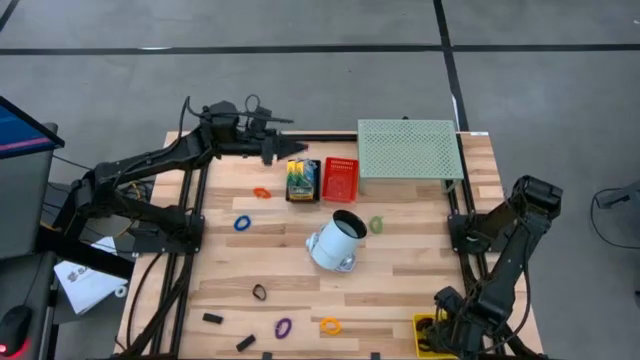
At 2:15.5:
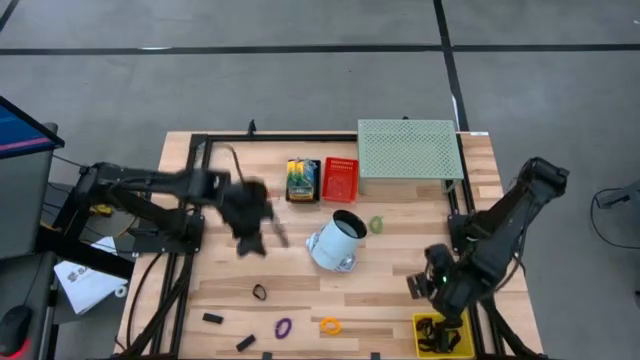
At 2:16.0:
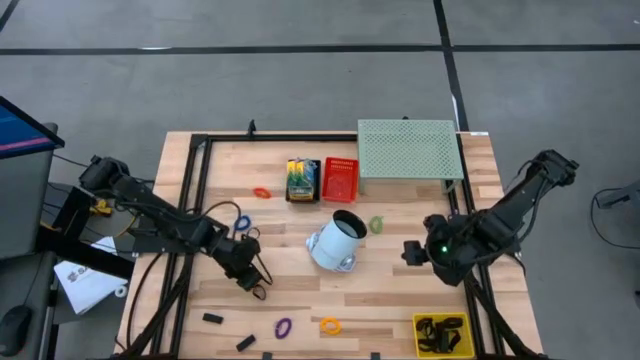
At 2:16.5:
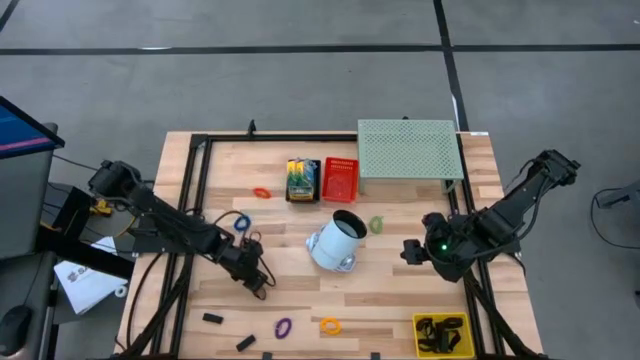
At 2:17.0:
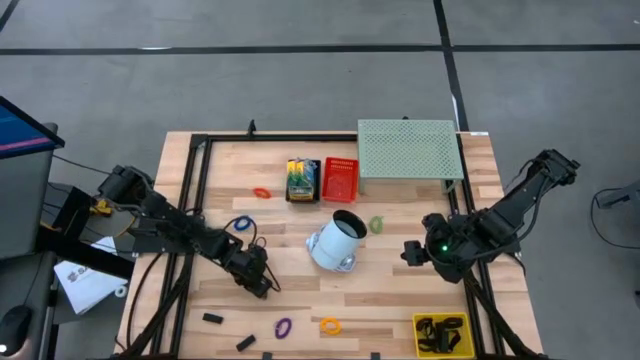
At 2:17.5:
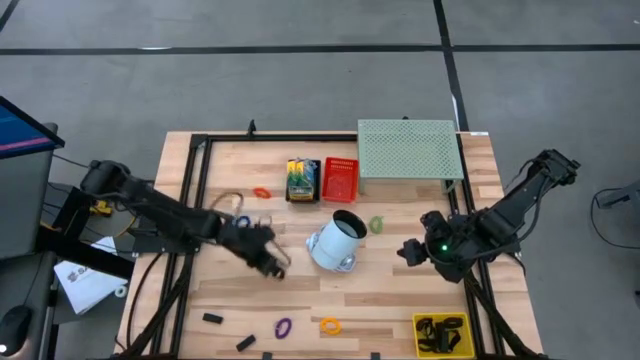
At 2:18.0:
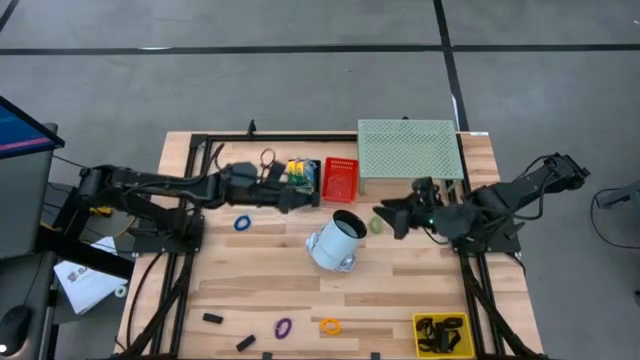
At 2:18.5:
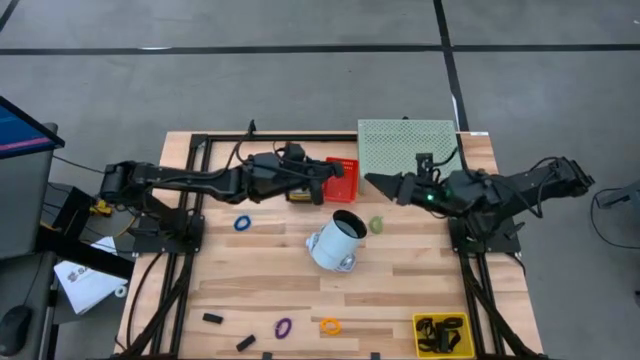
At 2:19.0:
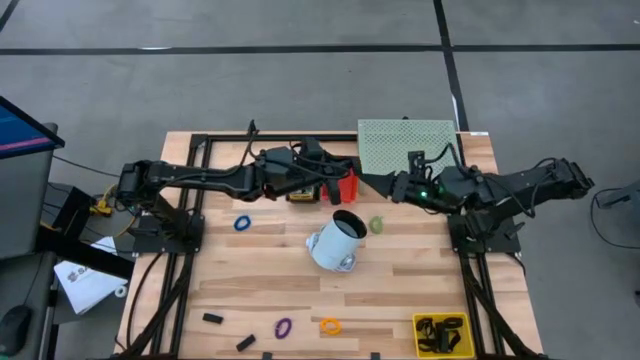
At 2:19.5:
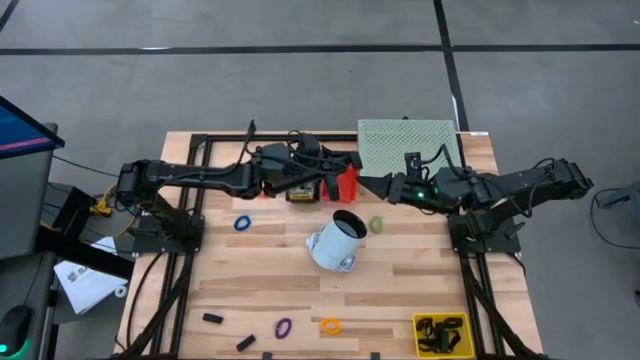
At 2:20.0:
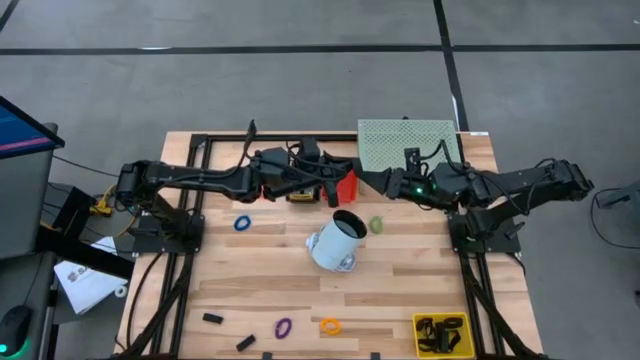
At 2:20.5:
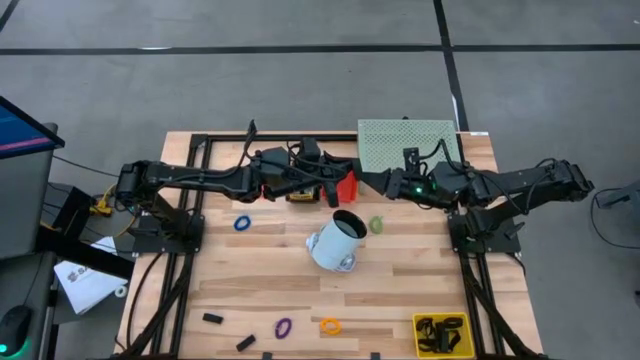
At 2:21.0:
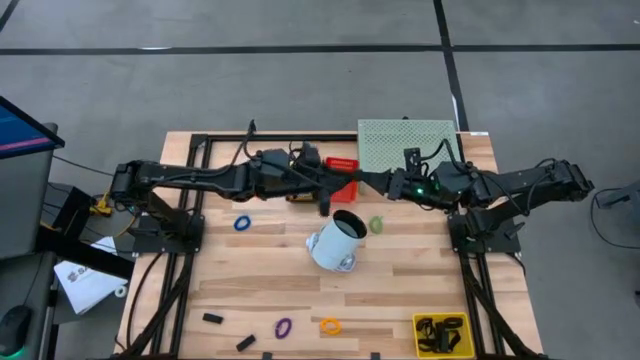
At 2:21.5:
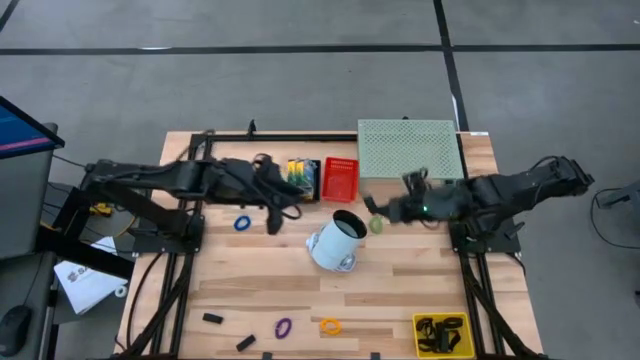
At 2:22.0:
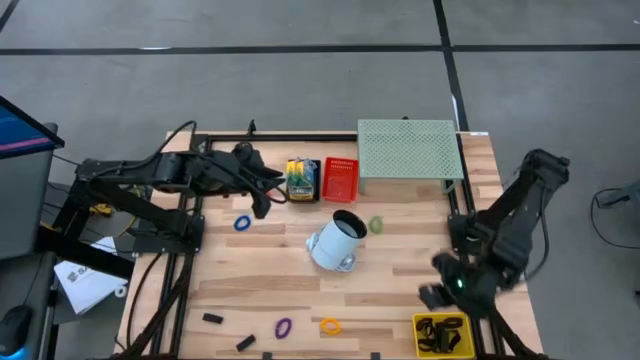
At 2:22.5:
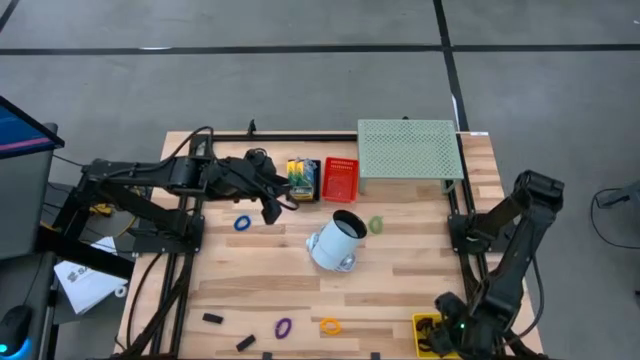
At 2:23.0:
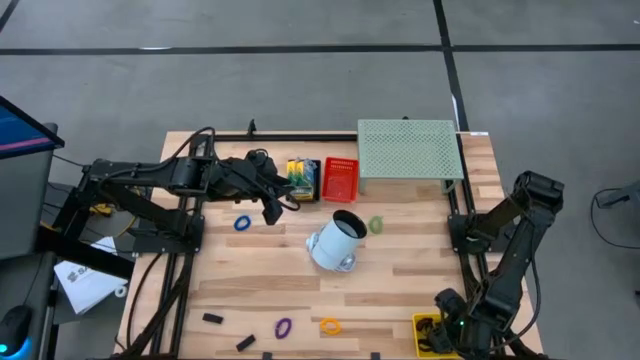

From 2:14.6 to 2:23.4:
Task: Pick & Place Office Desk Supplies
Put the black rubber band into the yellow bin

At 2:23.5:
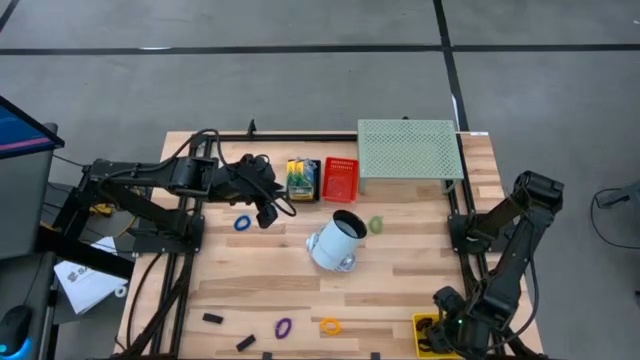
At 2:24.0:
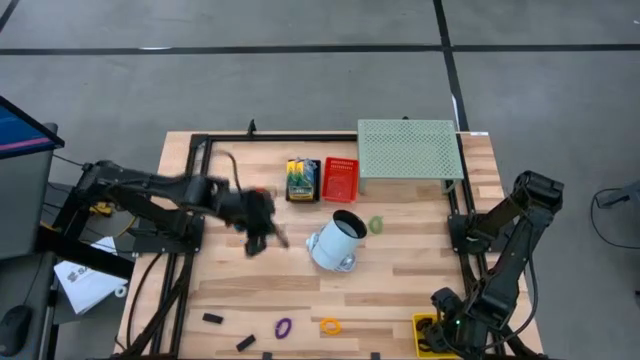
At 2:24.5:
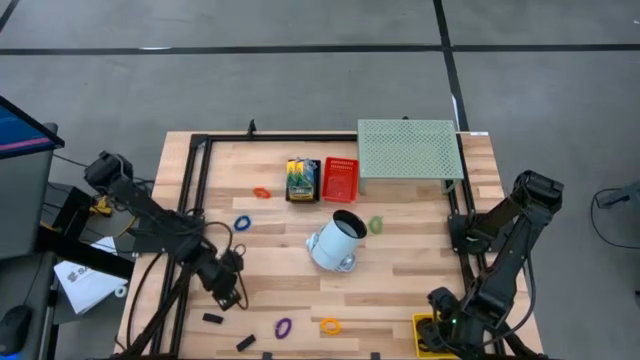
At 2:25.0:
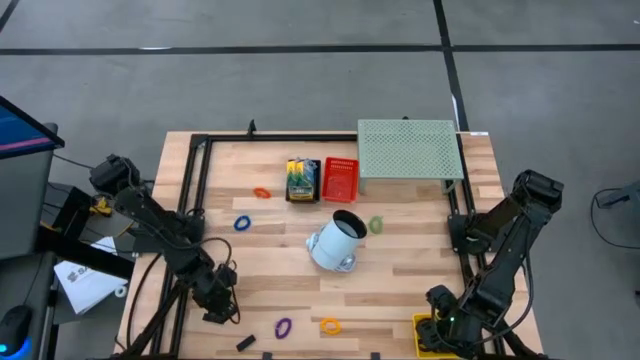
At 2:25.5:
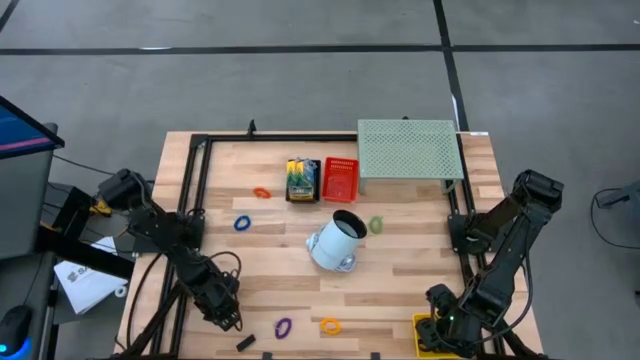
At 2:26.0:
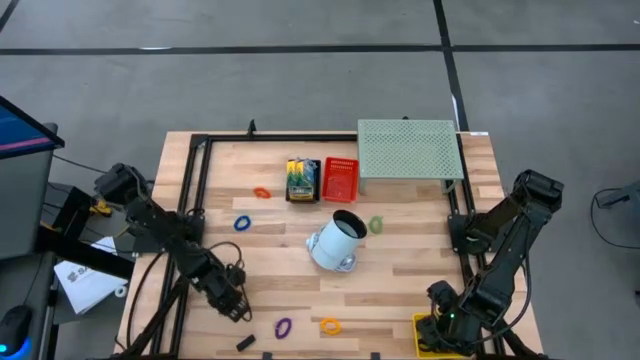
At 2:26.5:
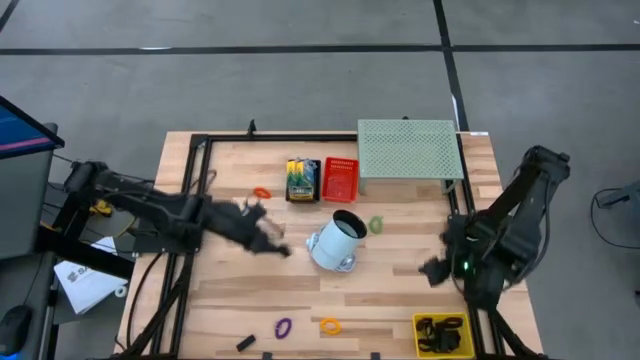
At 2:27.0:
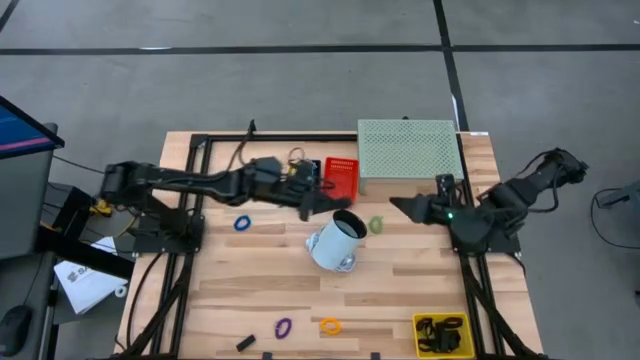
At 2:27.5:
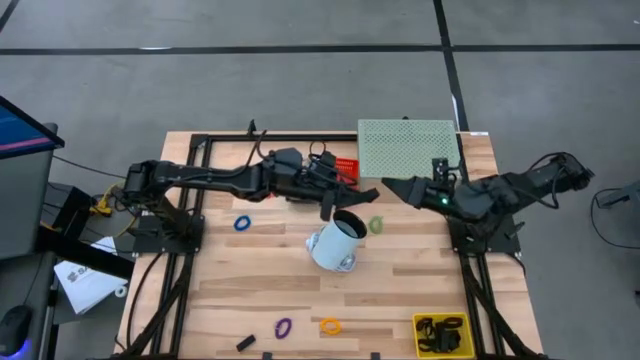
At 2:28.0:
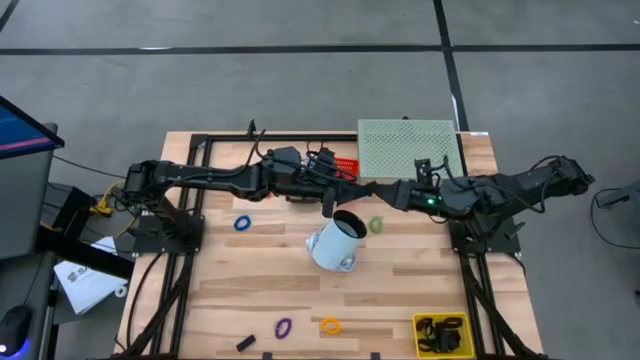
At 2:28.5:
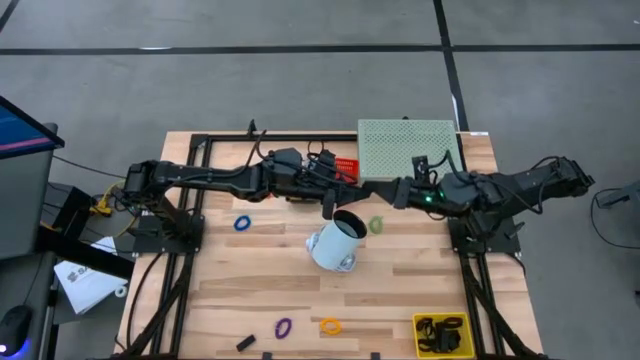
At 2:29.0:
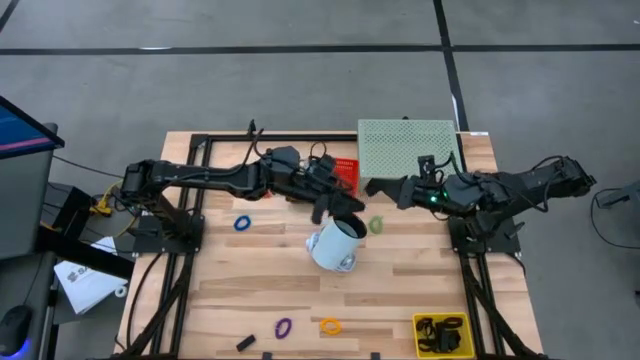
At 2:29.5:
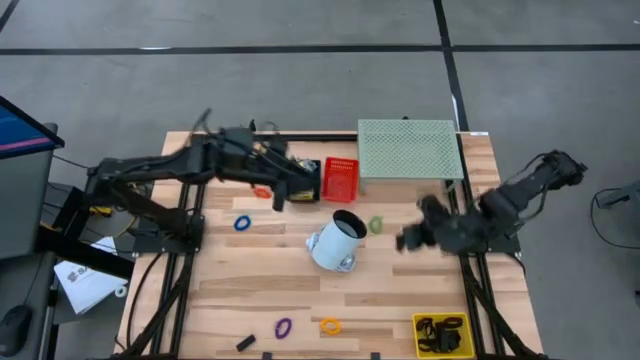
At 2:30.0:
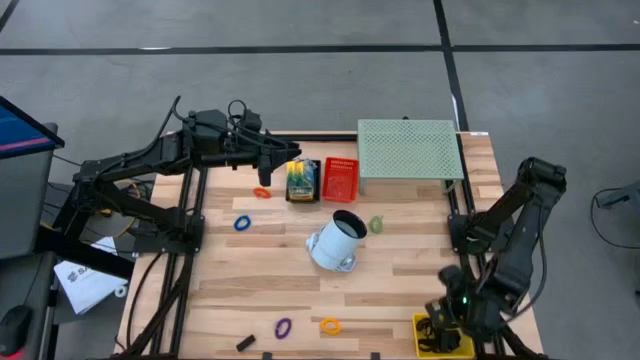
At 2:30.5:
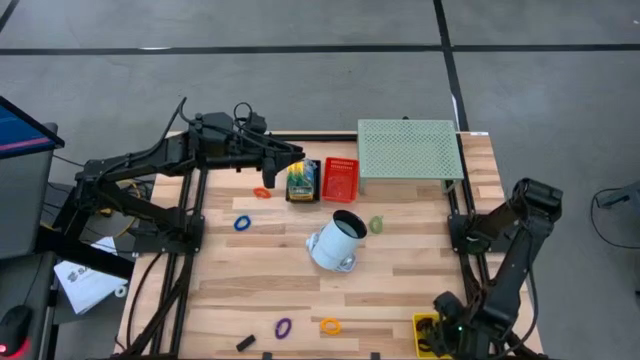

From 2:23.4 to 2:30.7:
Put the black rubber band into the yellow bin

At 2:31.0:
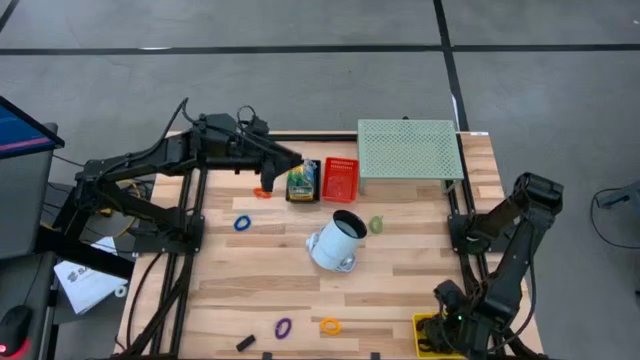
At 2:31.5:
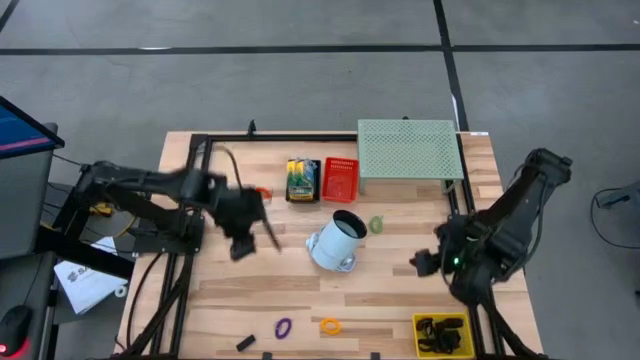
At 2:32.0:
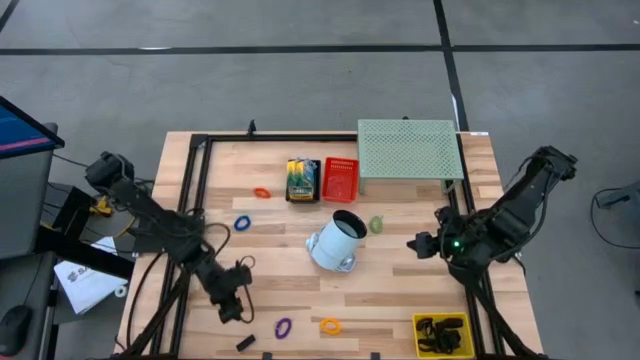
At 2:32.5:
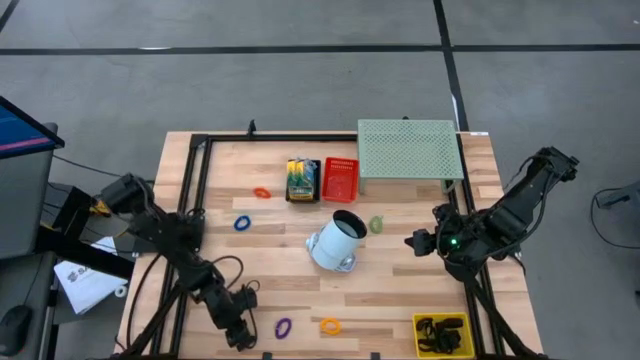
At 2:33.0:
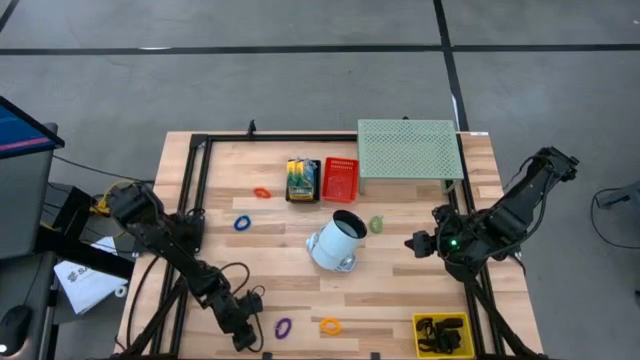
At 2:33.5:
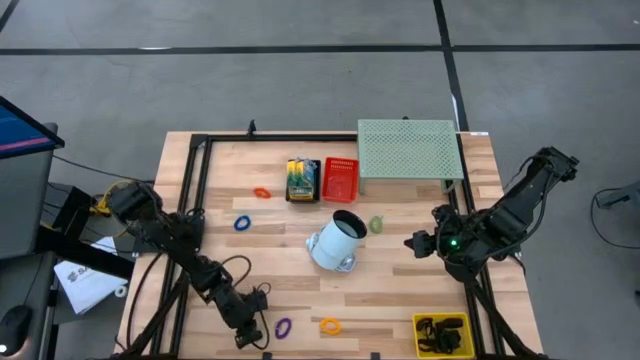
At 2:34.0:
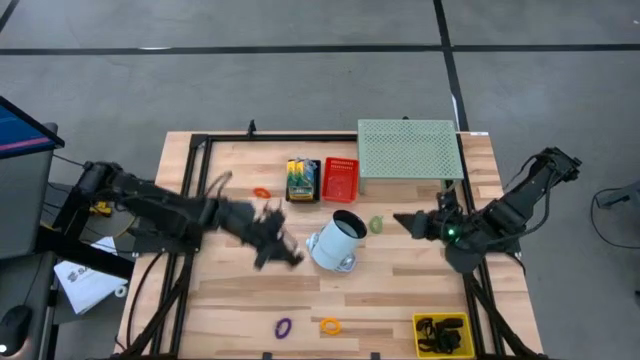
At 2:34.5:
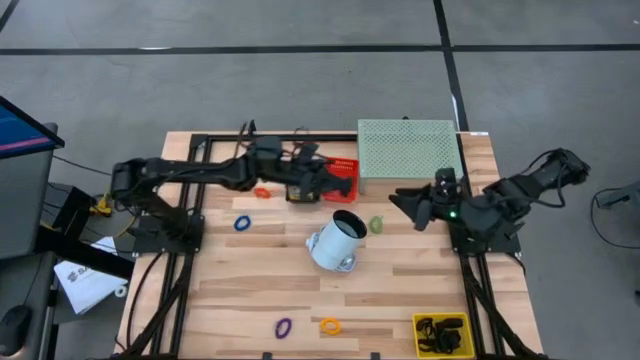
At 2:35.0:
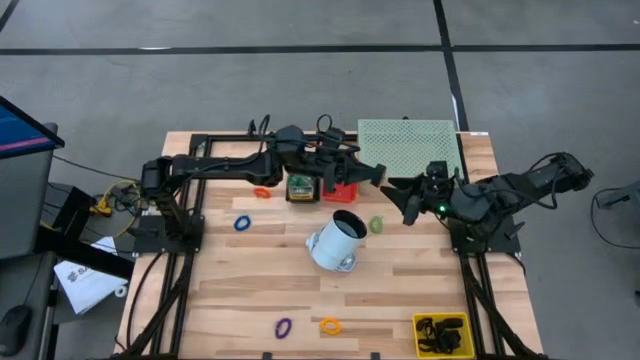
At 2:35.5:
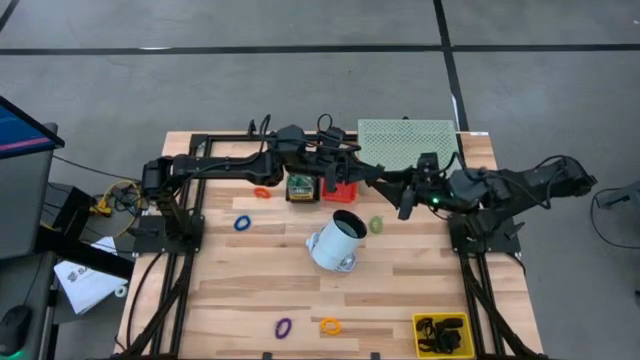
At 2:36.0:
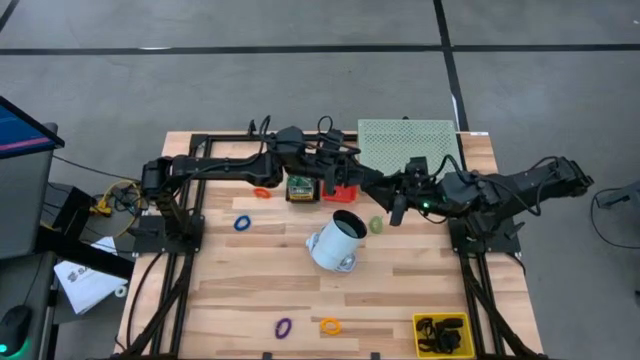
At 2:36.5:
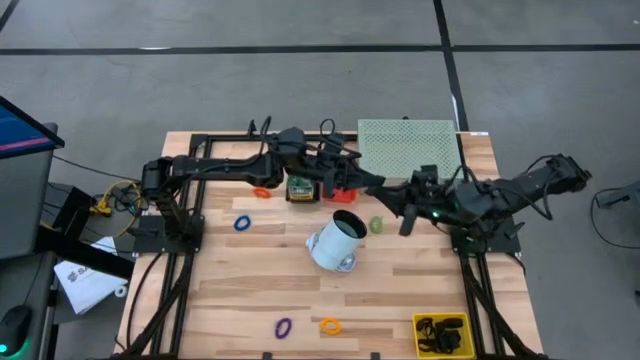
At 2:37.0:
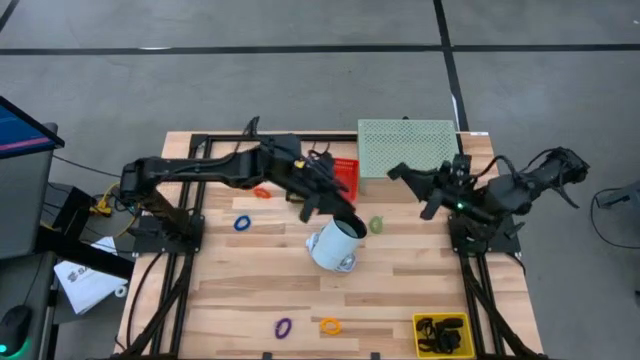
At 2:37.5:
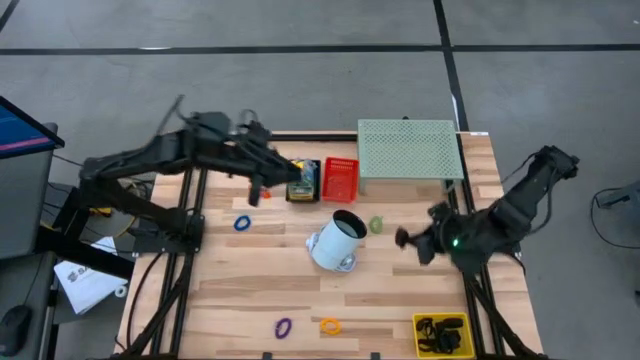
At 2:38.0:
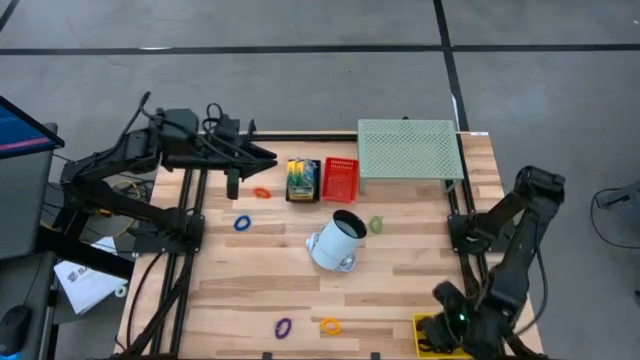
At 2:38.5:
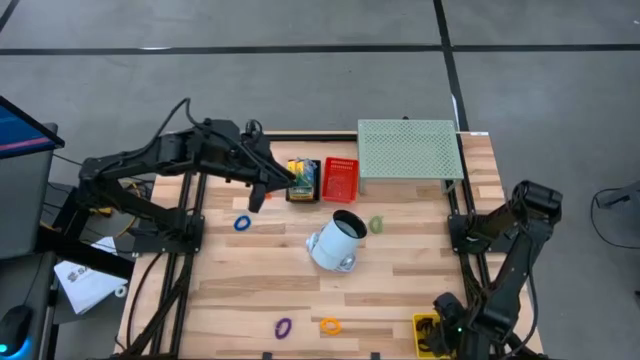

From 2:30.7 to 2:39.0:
Put the black rubber band into the yellow bin
